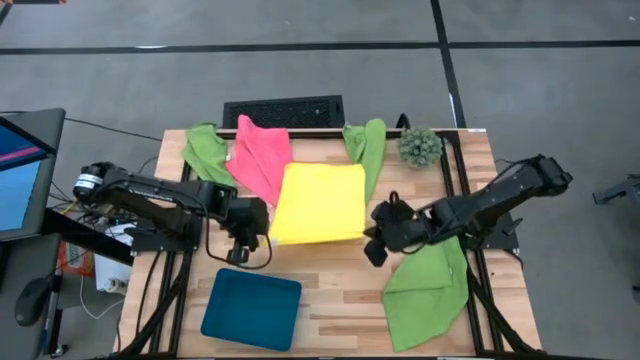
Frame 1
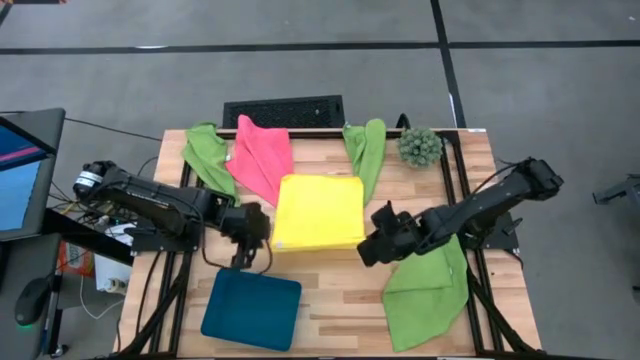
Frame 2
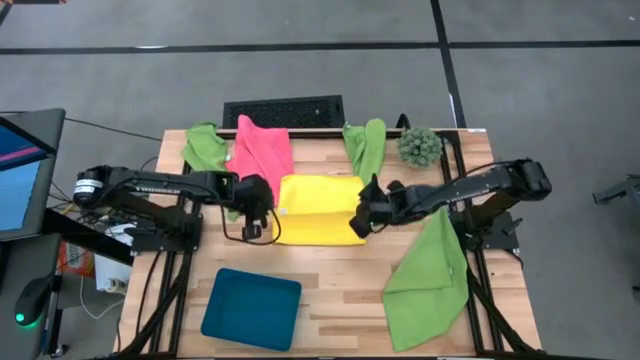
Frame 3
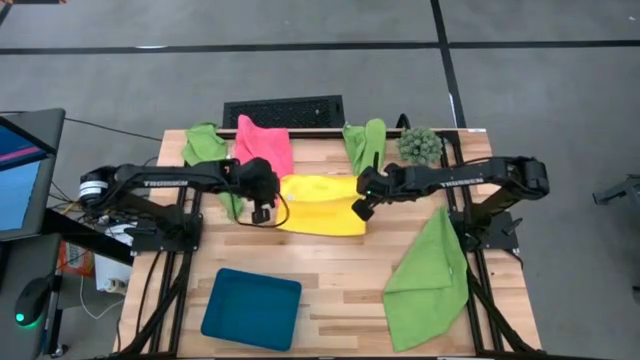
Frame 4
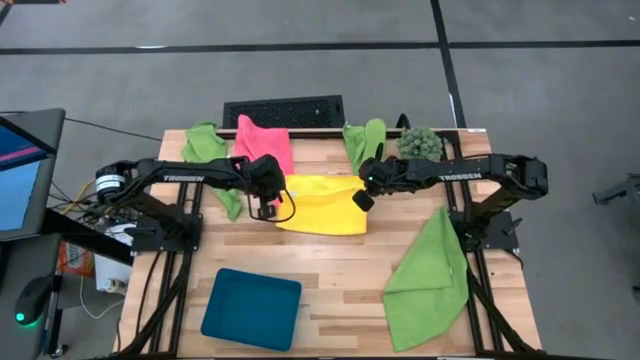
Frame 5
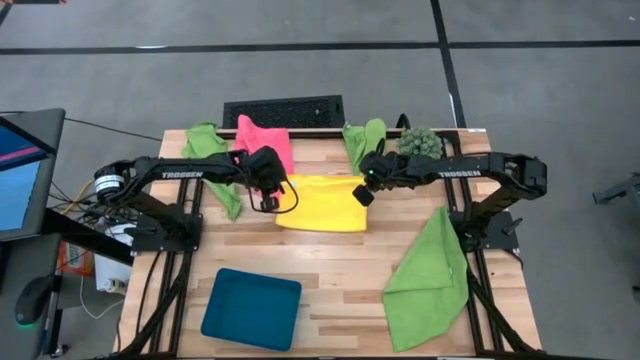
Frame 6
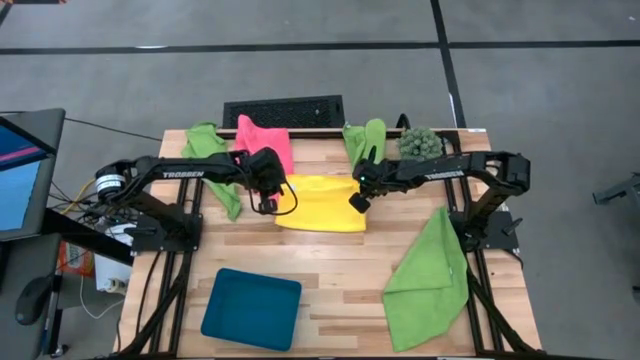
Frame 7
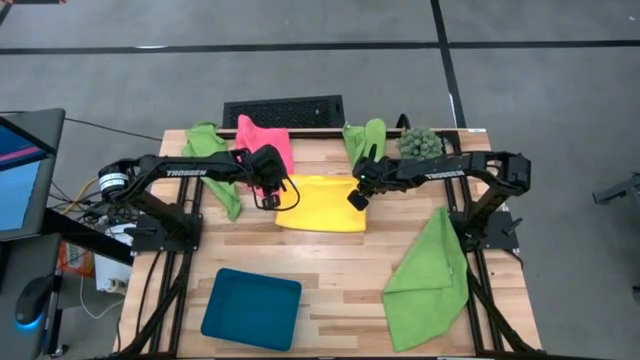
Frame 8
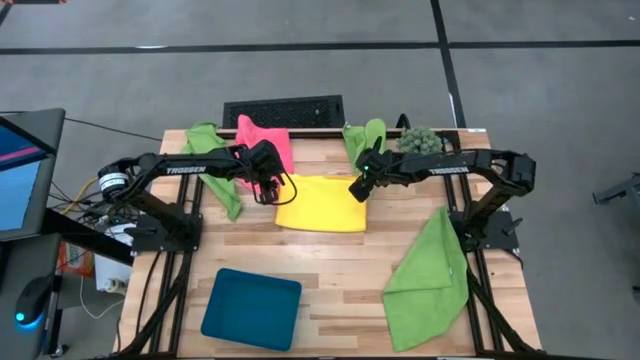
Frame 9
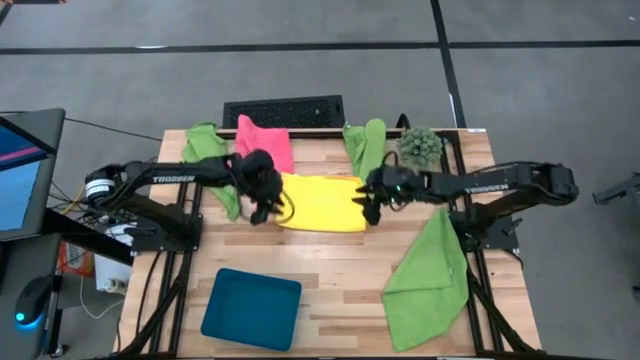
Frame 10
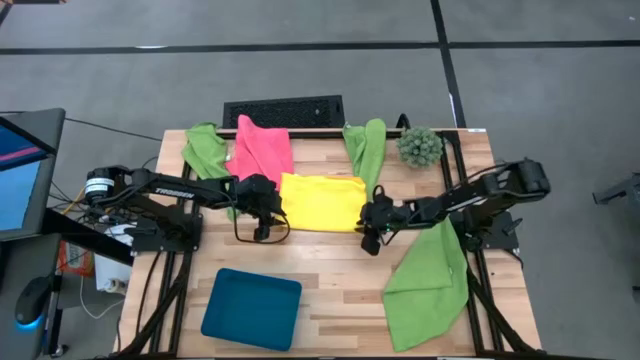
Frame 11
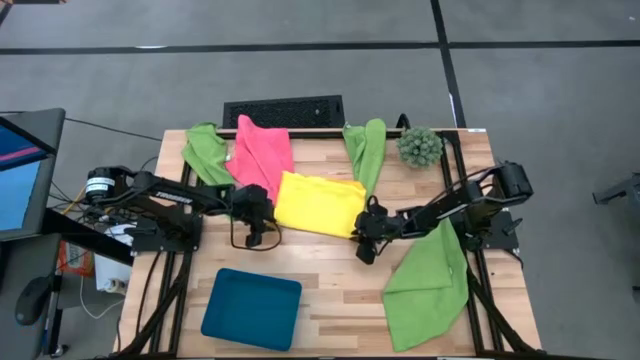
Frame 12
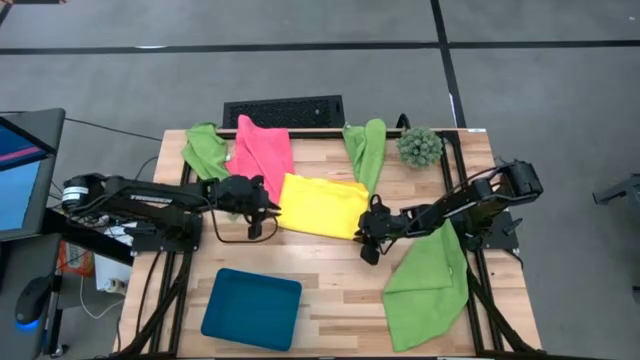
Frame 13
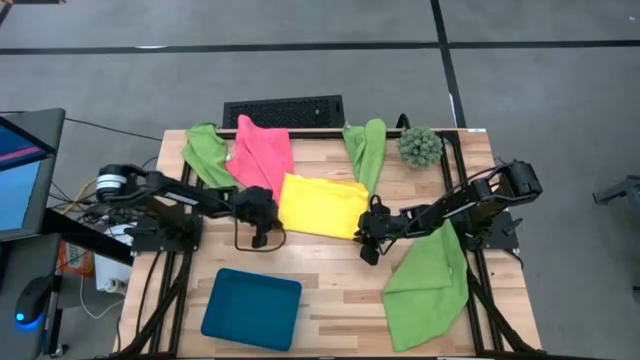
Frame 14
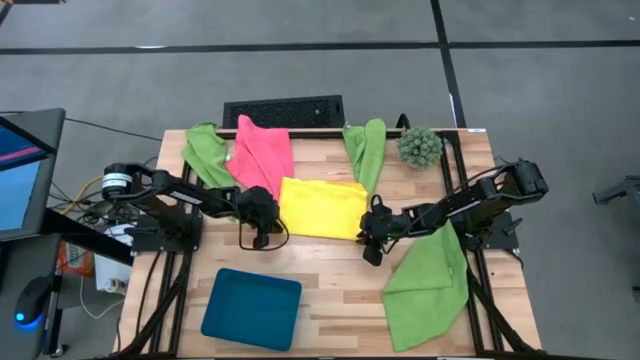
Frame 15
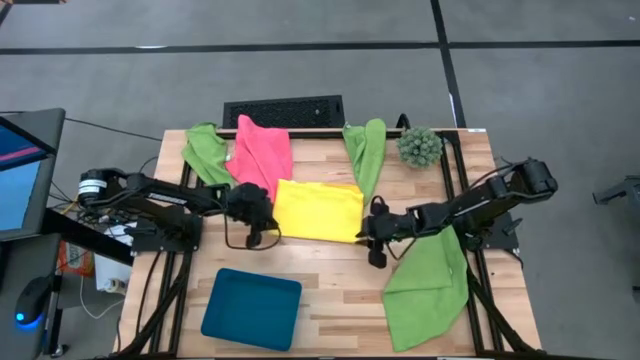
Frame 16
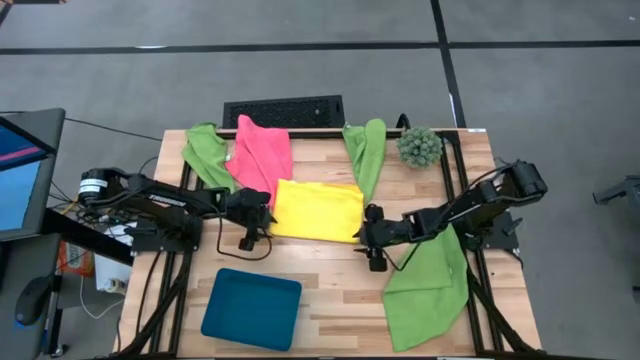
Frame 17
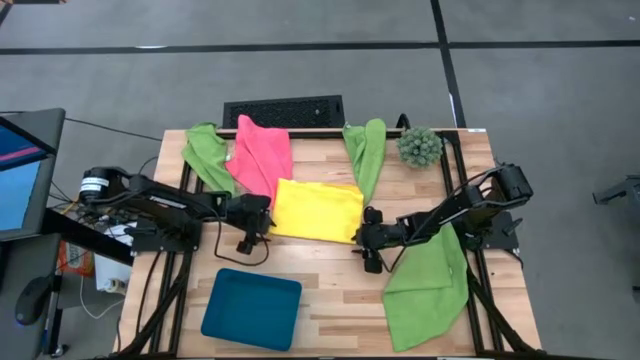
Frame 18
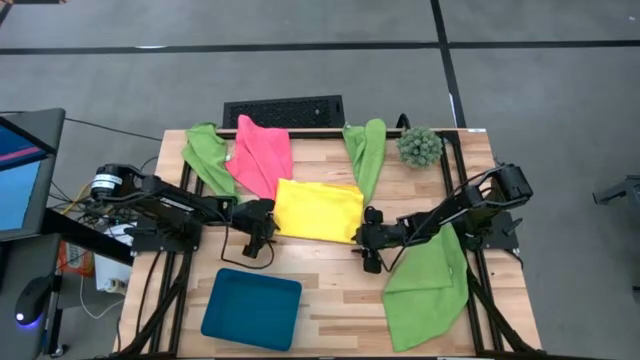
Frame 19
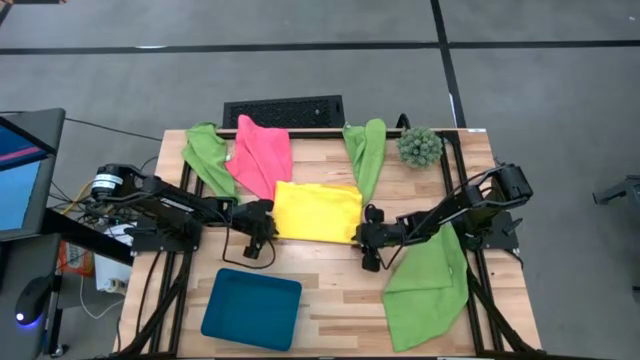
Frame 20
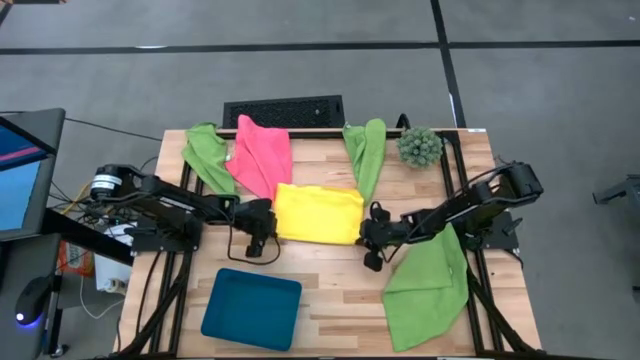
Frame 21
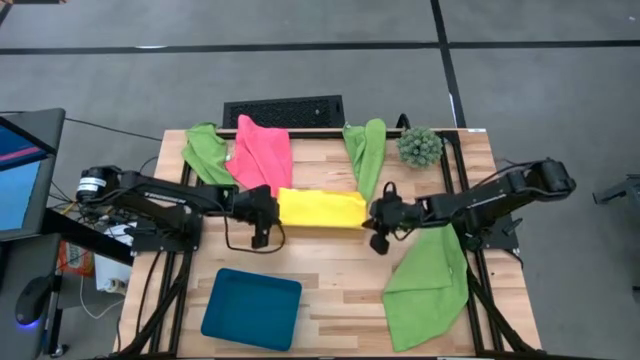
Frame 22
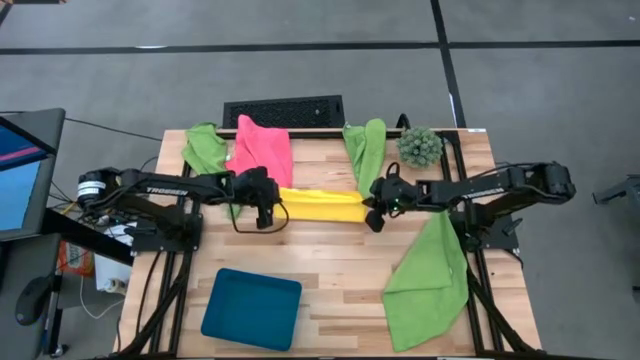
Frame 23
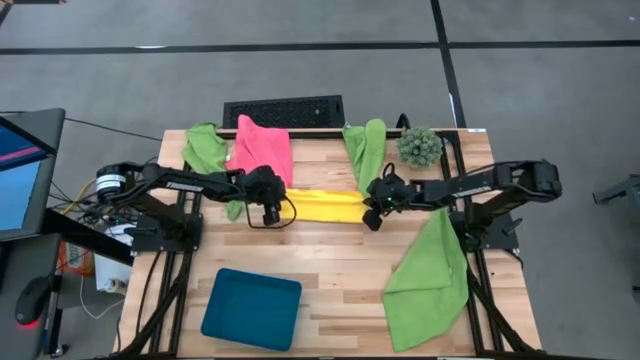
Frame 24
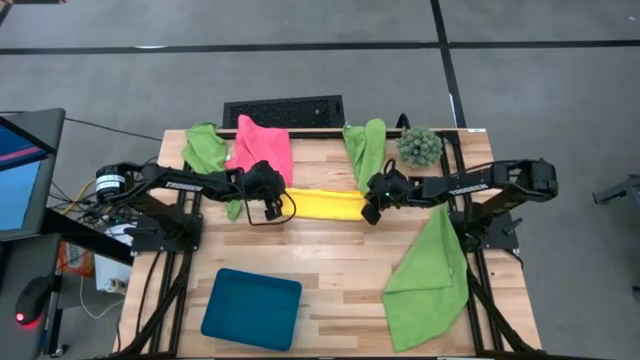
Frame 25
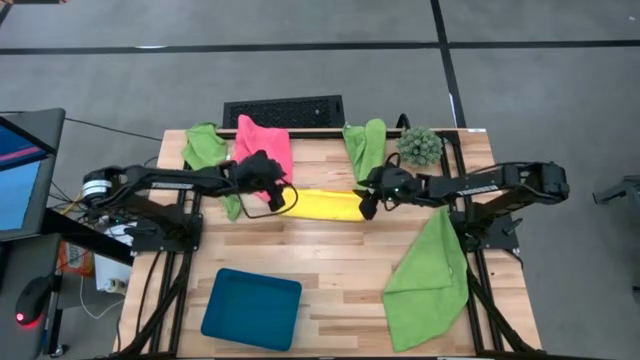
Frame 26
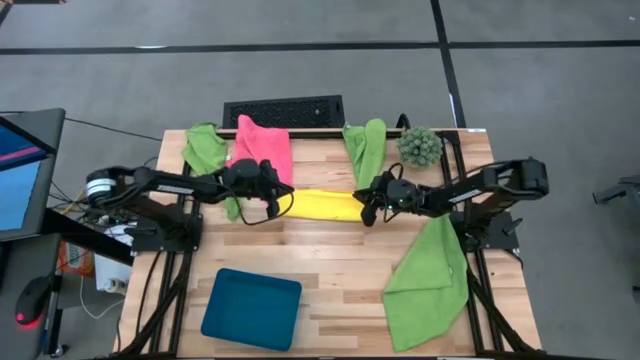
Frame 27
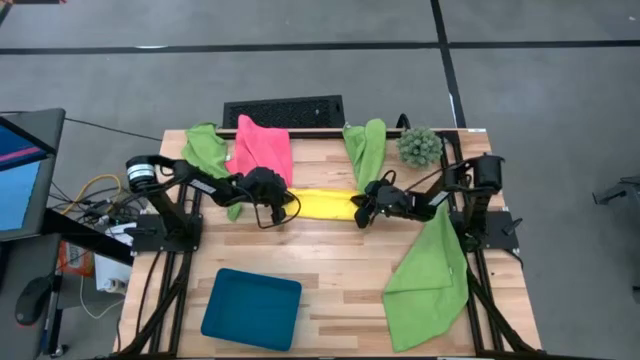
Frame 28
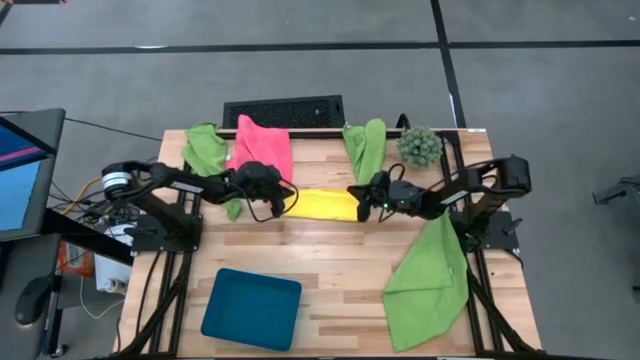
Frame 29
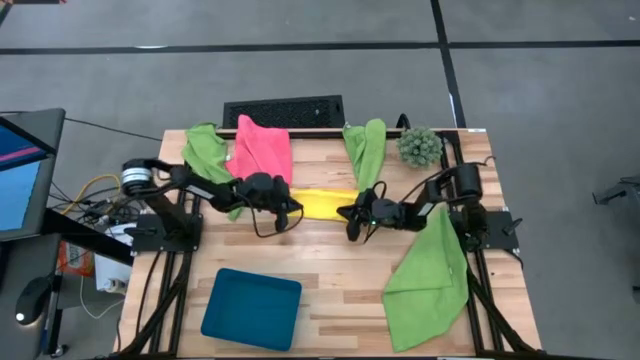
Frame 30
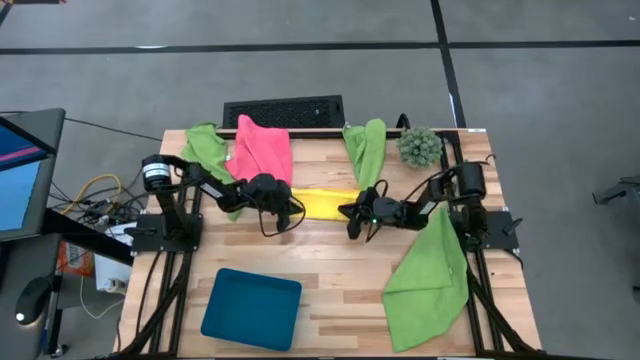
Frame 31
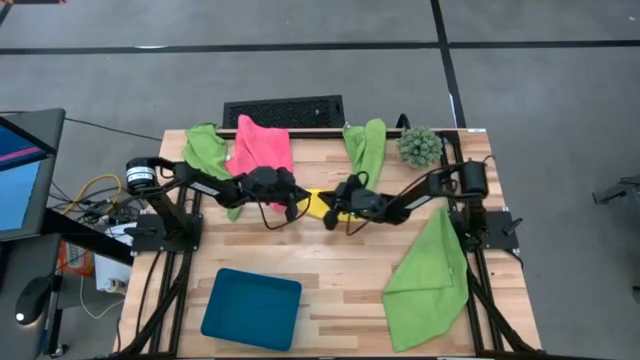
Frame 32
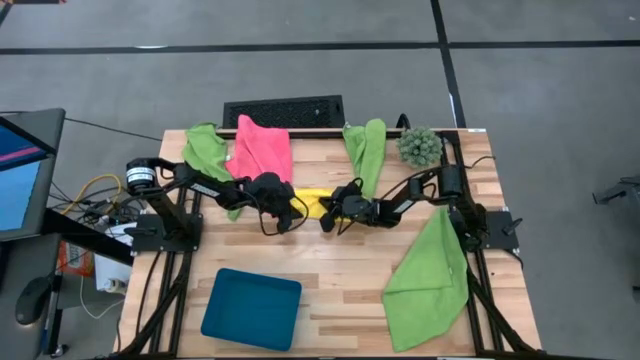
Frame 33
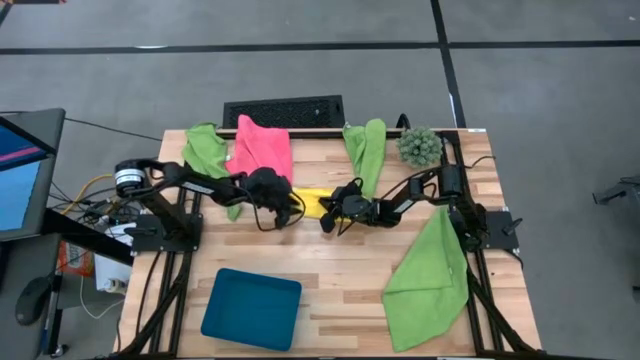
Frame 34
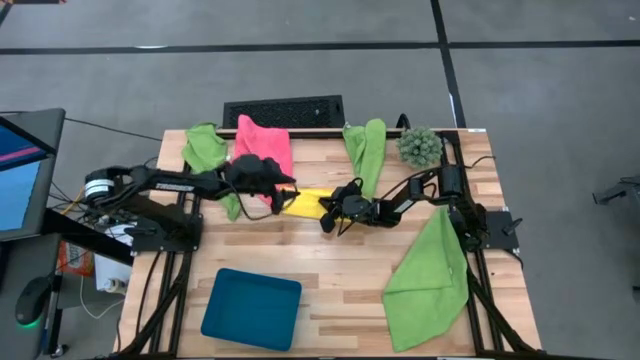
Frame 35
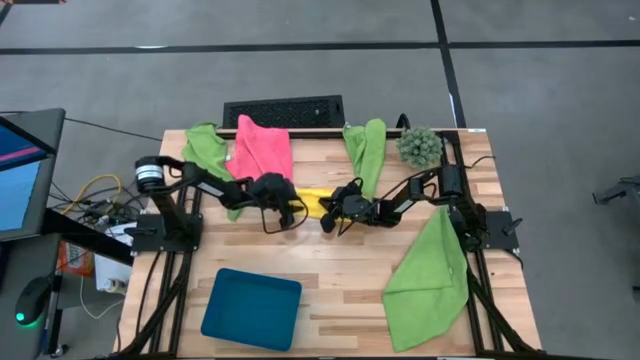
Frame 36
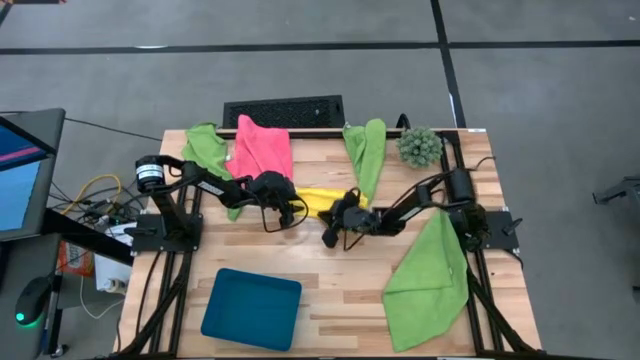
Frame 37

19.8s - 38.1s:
Task: Fold microfiber towels
Fold the yellow microfiber towel

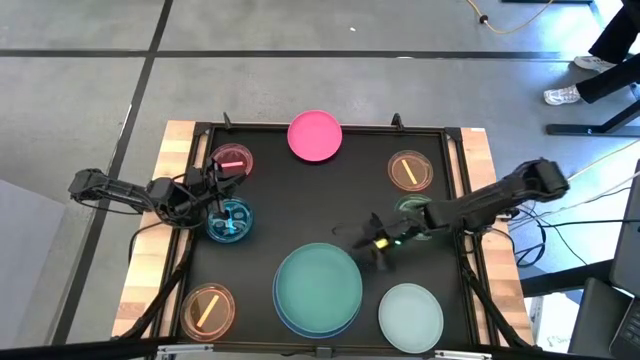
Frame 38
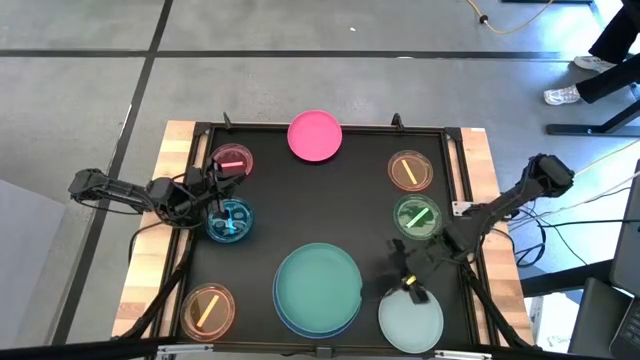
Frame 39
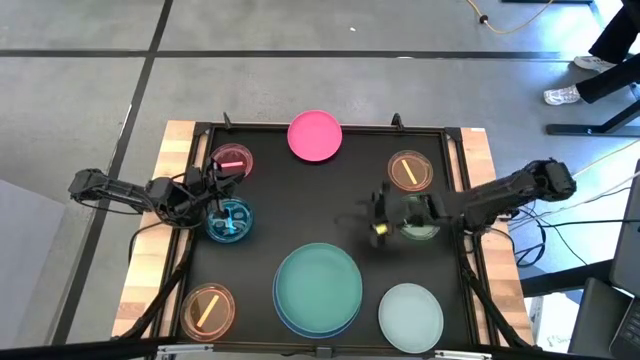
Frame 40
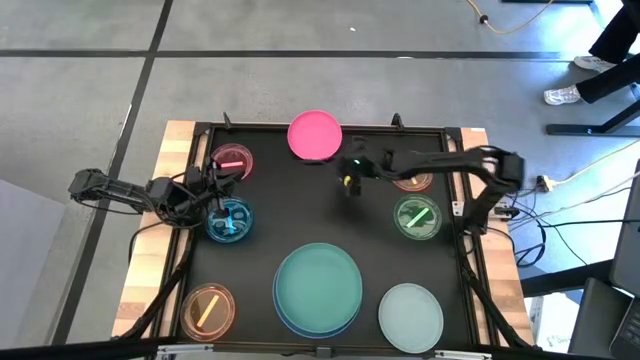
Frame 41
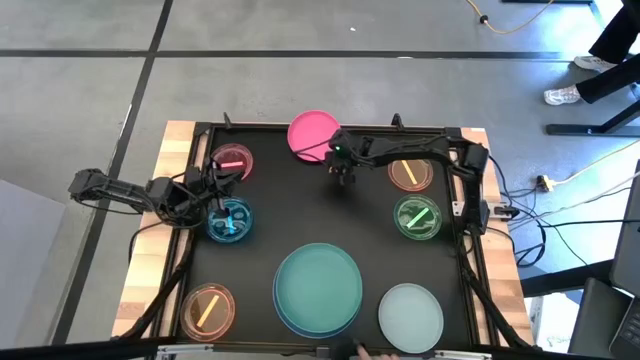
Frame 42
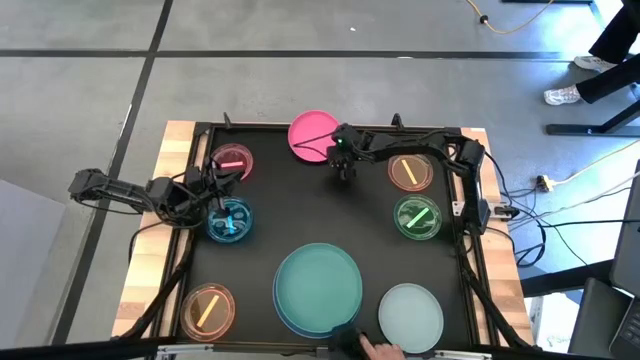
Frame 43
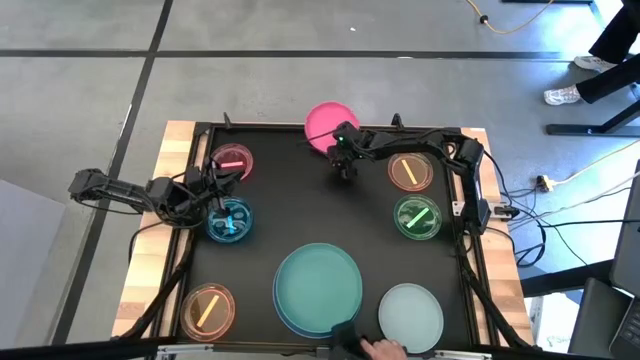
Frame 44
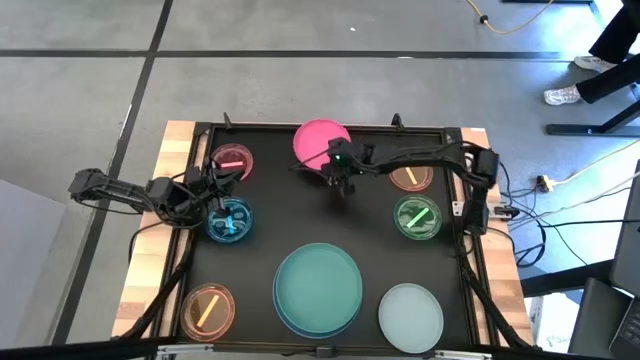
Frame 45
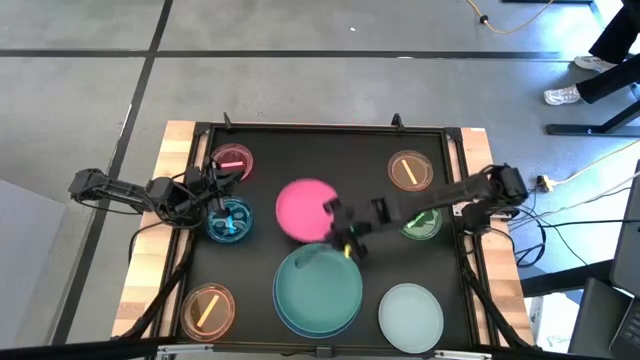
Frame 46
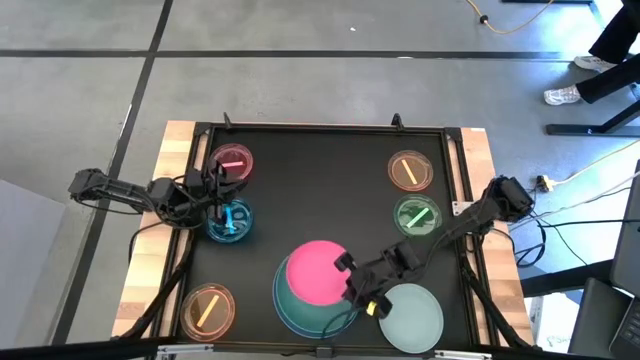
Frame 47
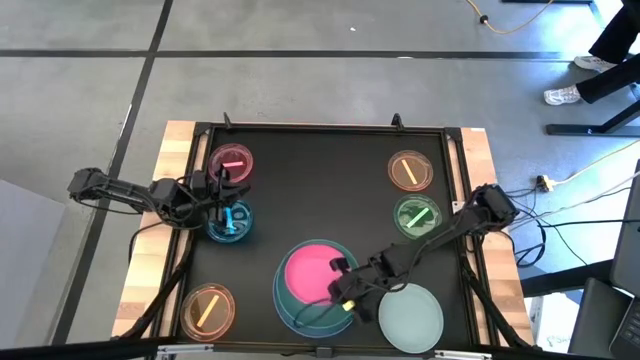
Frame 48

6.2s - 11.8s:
Task: Stack plastic plates
Stack the pink plate on top of the dark green plate
